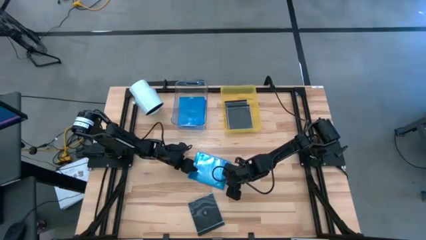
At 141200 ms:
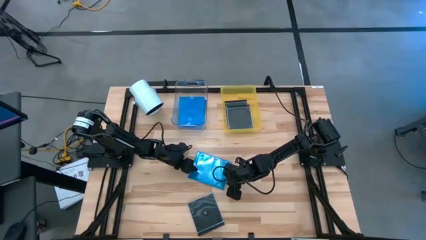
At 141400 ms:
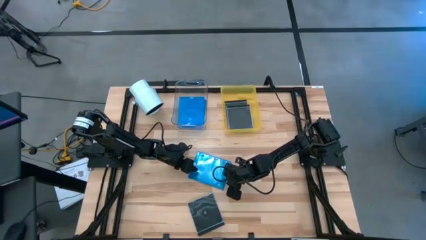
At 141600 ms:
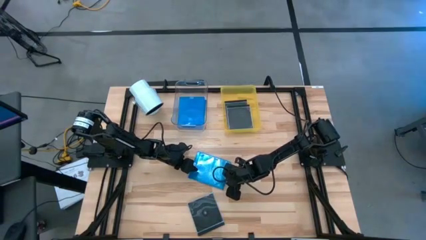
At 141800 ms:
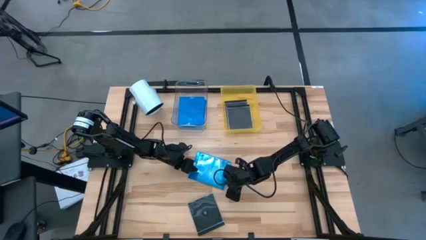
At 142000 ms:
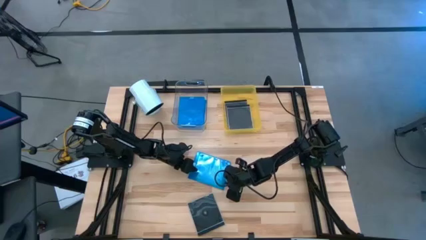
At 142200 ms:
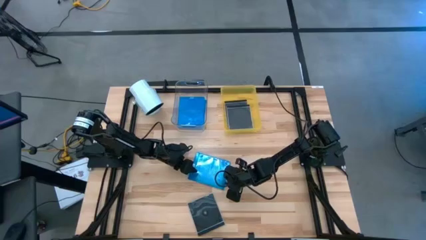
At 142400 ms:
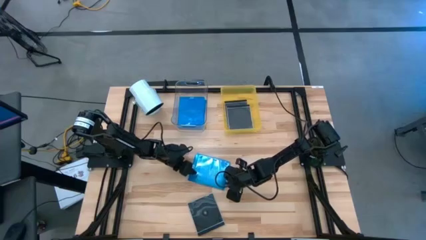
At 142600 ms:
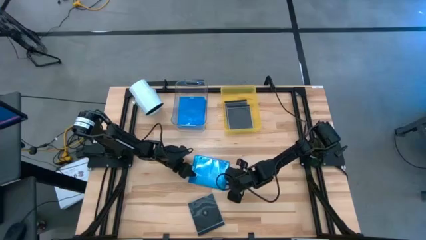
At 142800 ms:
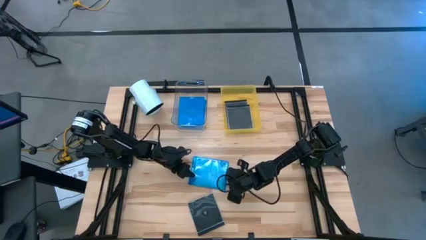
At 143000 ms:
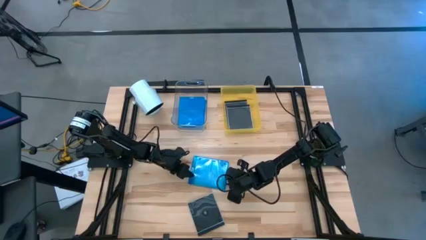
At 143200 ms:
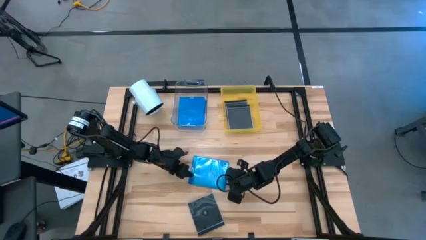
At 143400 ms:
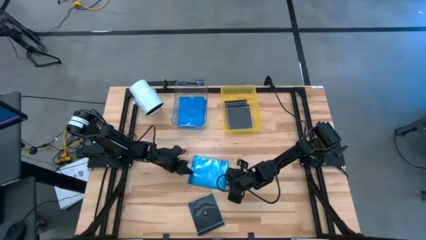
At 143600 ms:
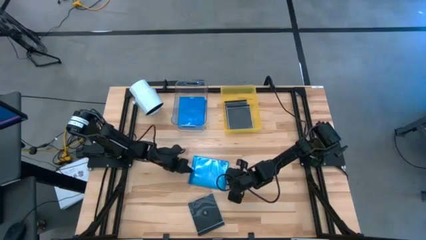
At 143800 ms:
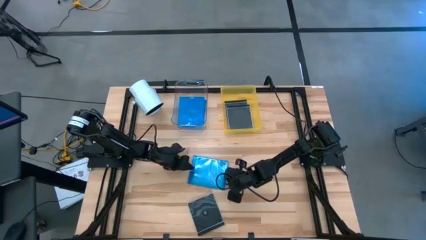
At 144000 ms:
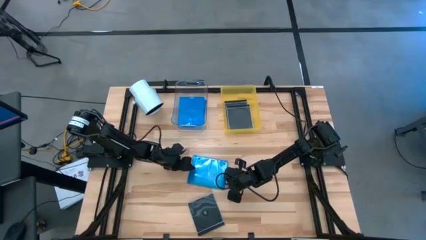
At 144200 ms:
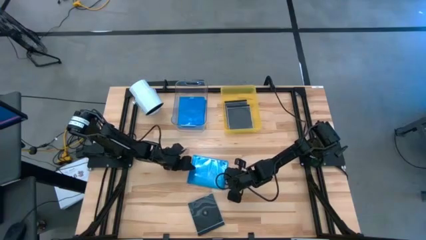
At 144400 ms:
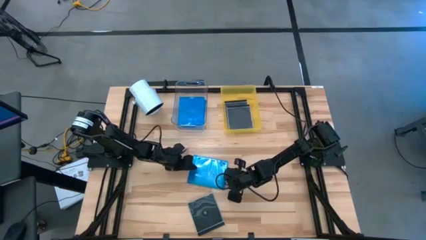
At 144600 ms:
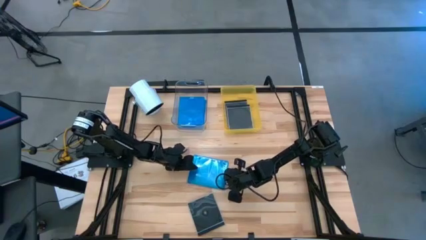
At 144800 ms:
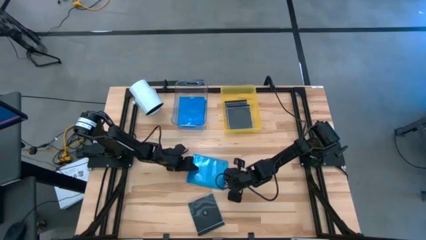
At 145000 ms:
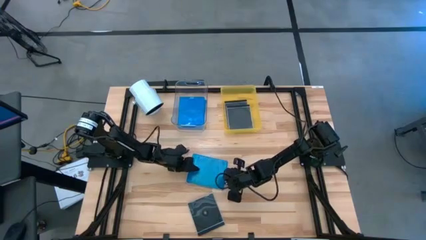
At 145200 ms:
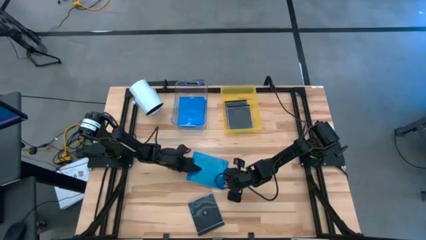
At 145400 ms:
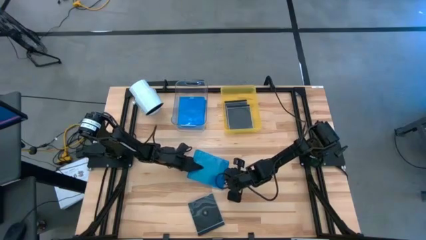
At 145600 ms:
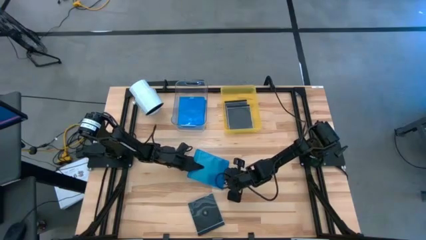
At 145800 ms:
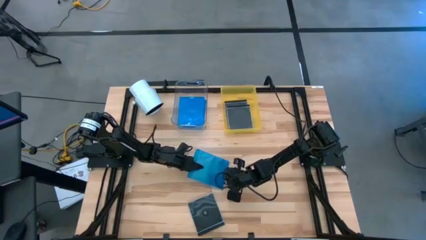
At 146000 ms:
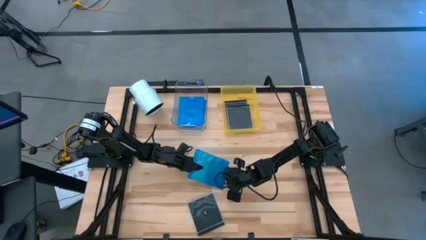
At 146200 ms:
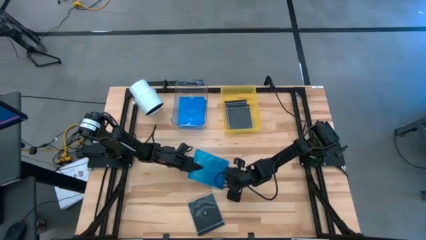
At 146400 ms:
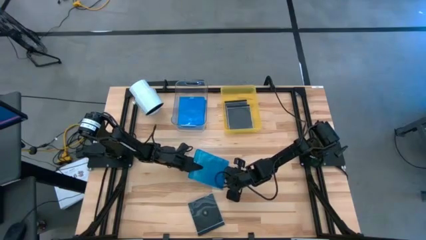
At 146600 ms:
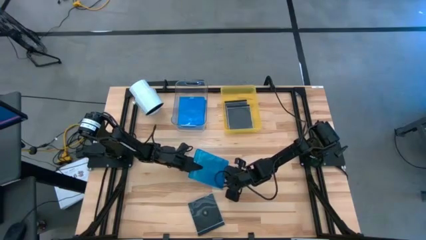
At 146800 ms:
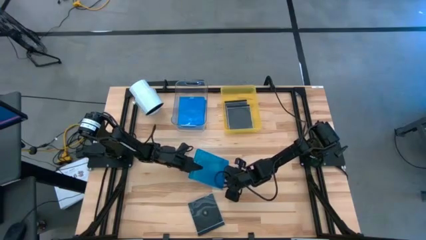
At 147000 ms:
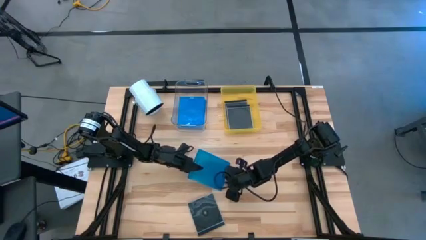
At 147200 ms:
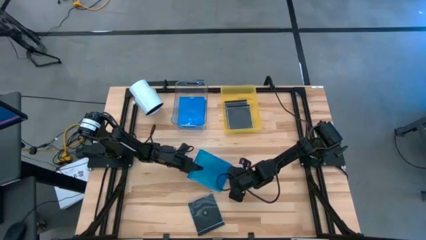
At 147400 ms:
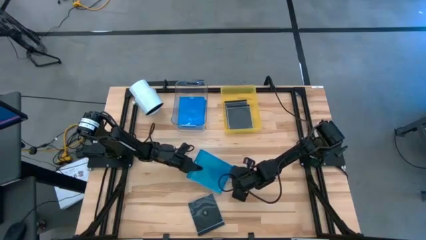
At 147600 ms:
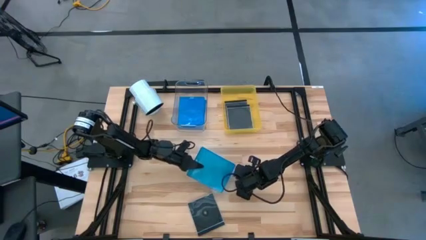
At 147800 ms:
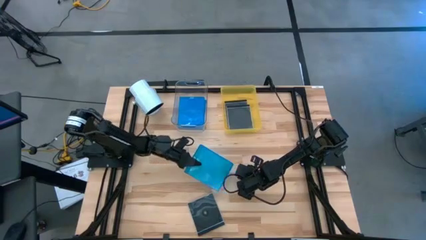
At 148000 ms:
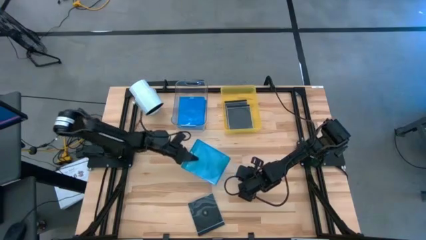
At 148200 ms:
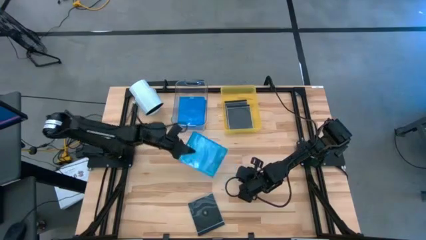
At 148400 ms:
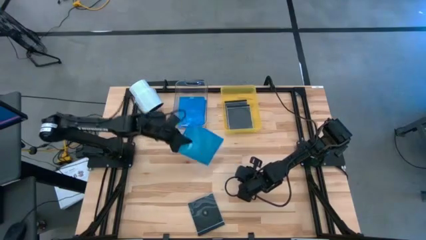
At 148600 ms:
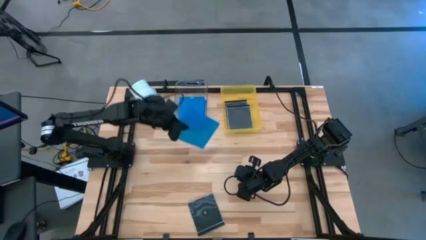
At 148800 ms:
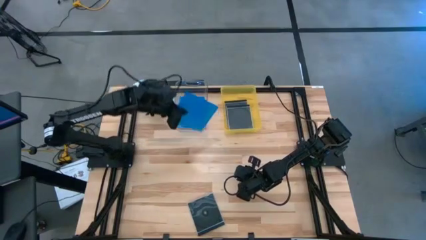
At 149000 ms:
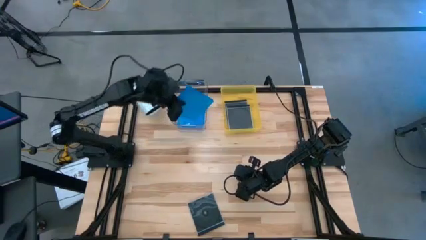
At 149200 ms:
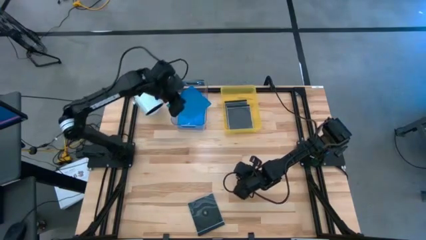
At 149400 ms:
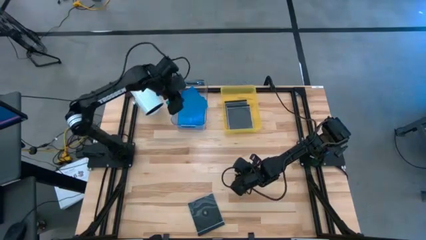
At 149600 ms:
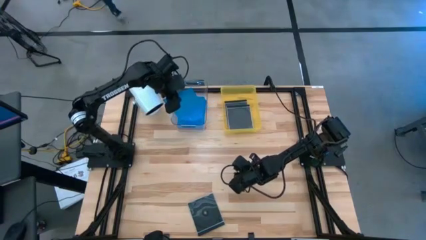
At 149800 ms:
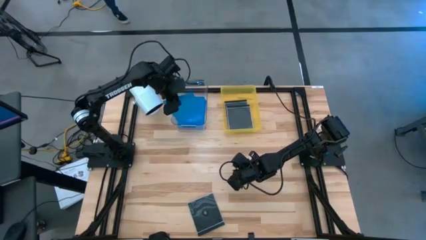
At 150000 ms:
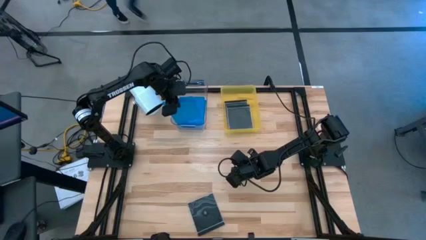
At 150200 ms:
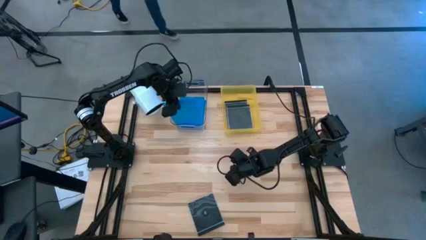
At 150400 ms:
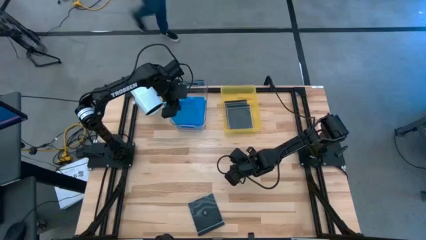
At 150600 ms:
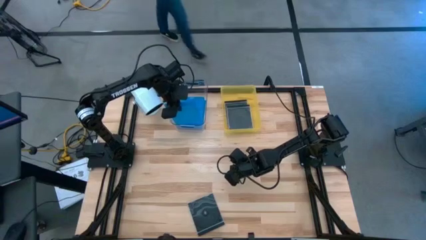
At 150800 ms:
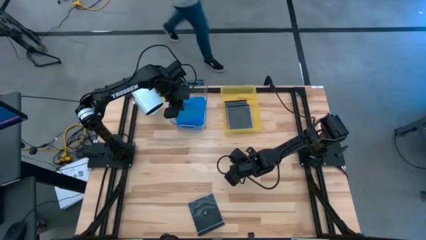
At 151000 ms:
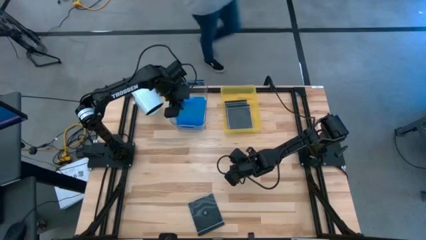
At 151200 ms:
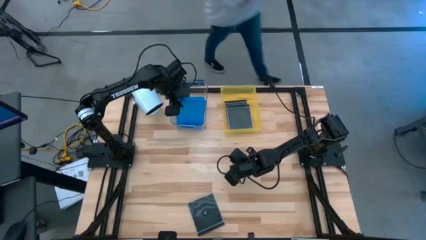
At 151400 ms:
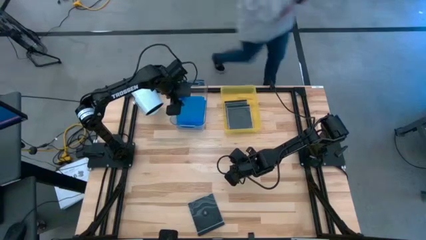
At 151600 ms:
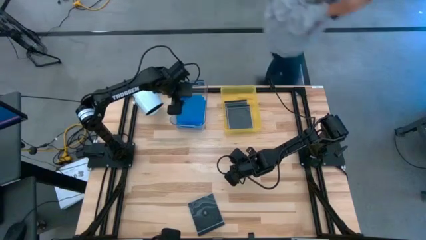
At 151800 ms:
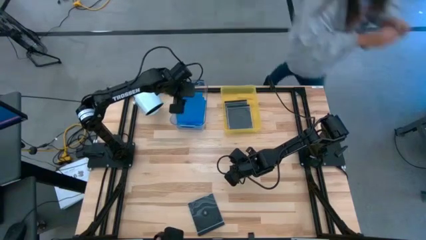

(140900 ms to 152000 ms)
Task: Pick & place jewel cases by type
Put the blue CD case into the transparent bin
